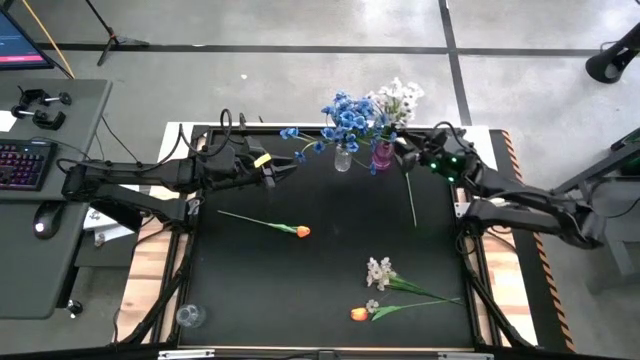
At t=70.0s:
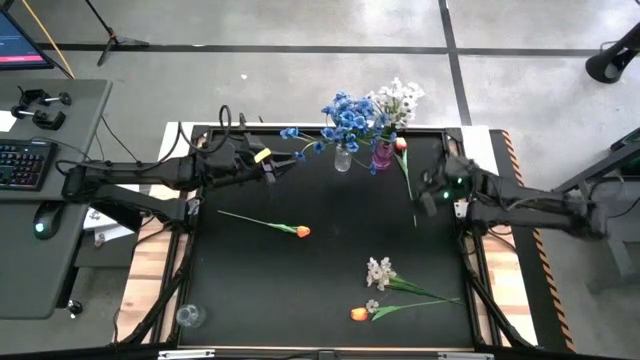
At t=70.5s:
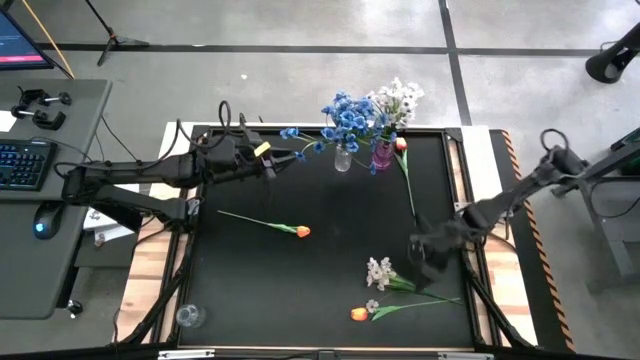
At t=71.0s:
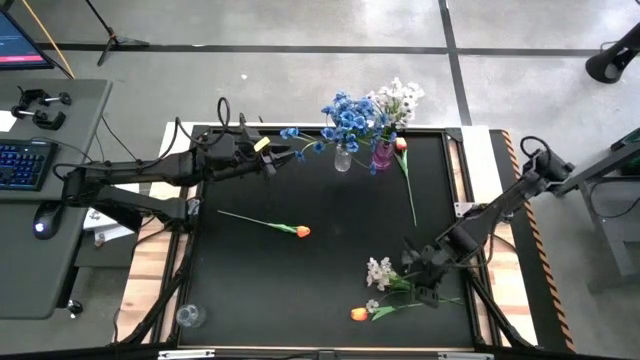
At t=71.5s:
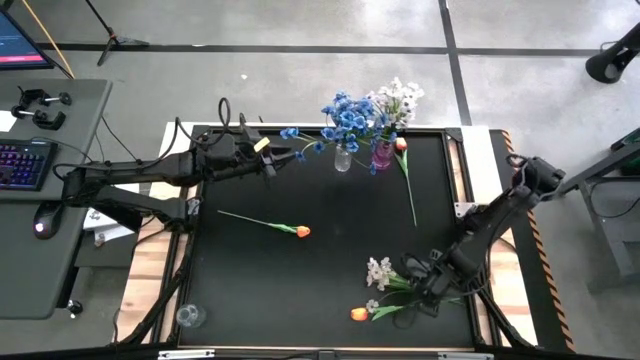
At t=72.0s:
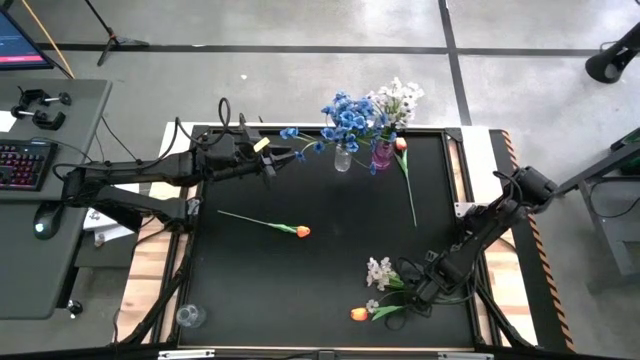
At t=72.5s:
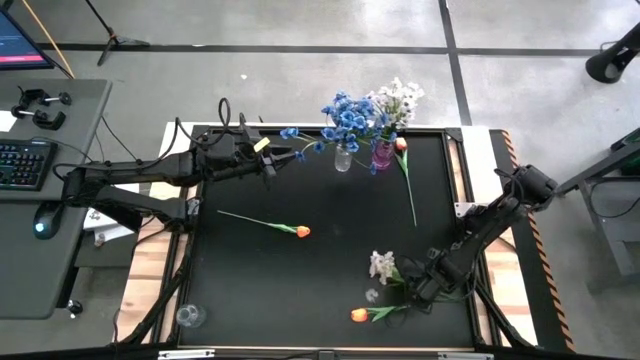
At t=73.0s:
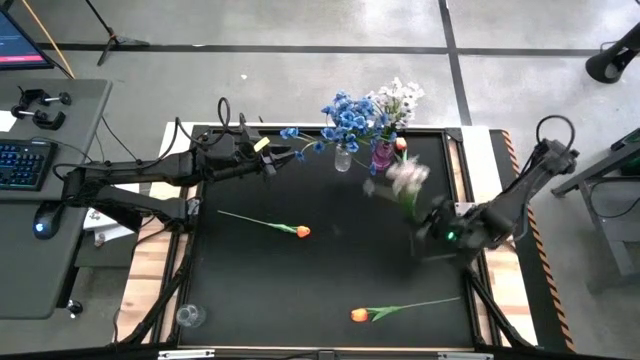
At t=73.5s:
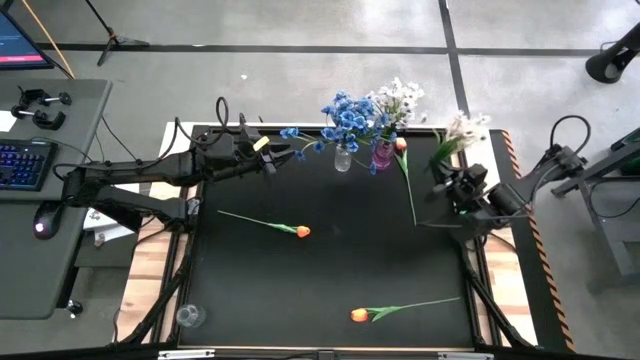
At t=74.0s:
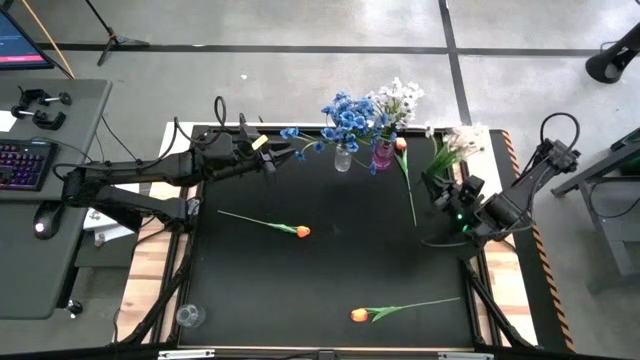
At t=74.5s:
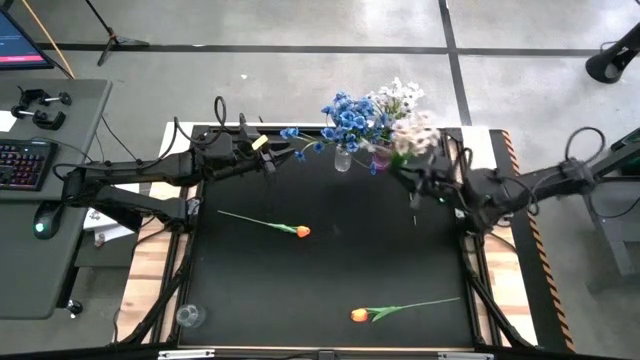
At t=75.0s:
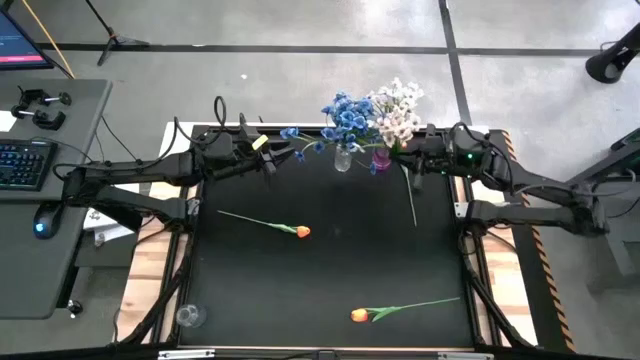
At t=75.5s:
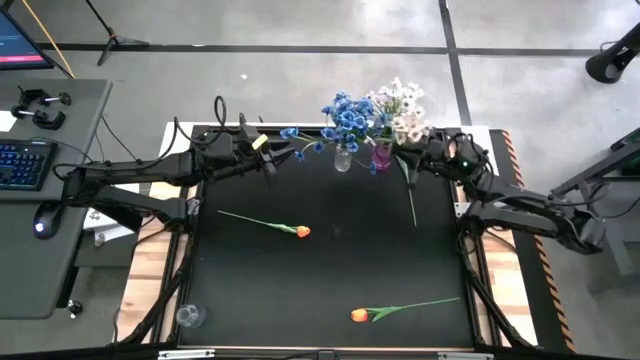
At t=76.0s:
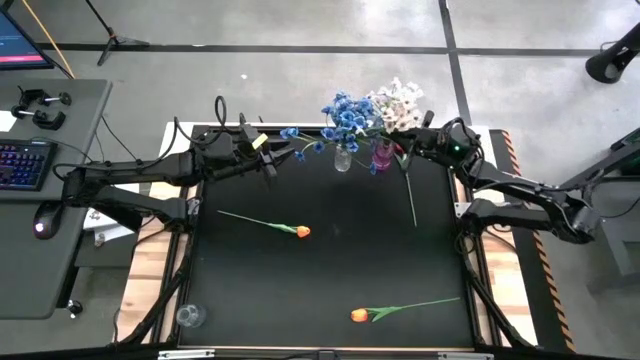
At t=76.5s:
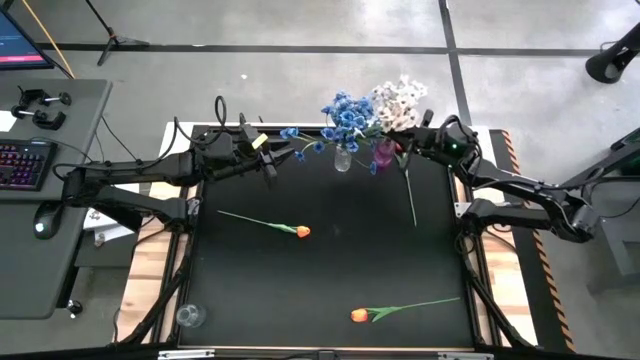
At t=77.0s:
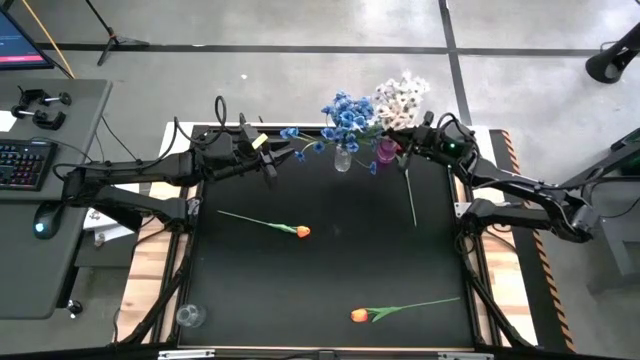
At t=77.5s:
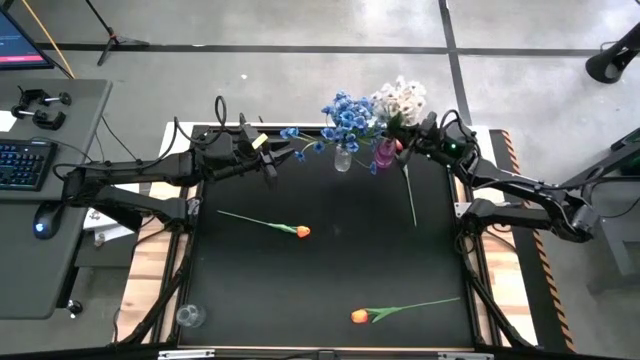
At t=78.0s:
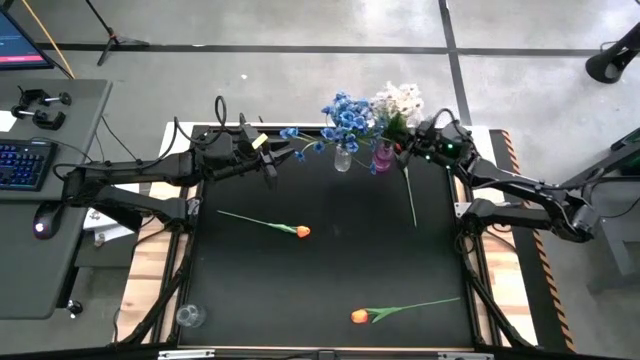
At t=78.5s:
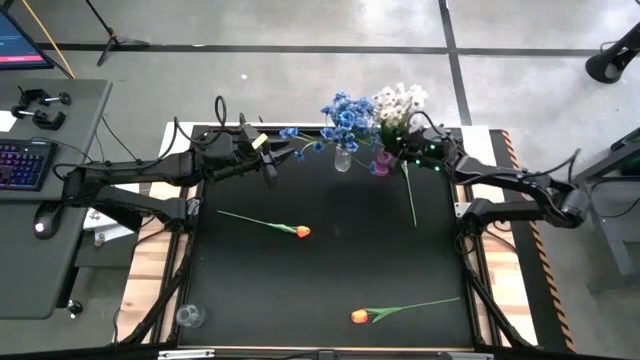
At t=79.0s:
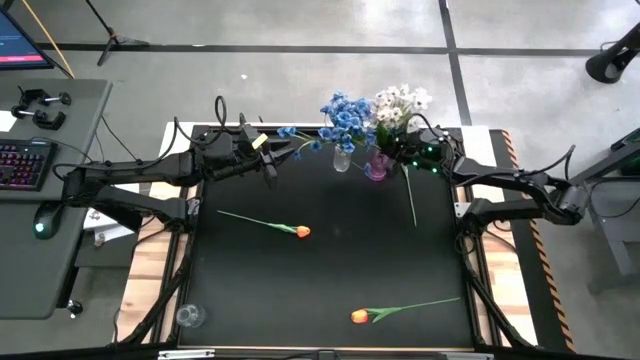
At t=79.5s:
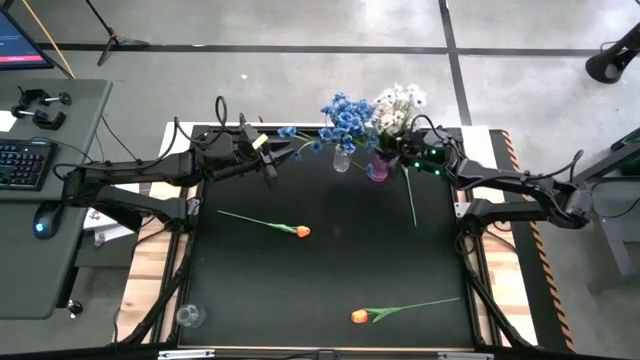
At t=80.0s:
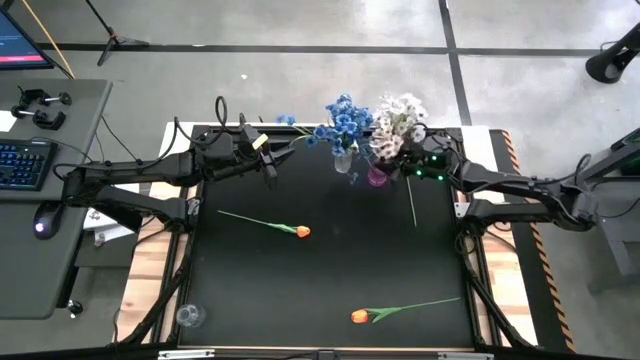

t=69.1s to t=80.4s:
Task: Sort flowers into vase by color
Put the white flowers into the purple vase

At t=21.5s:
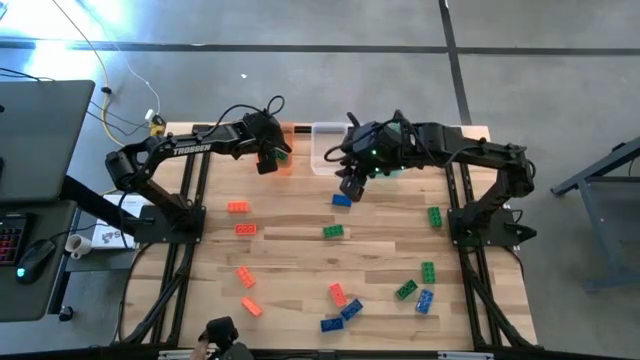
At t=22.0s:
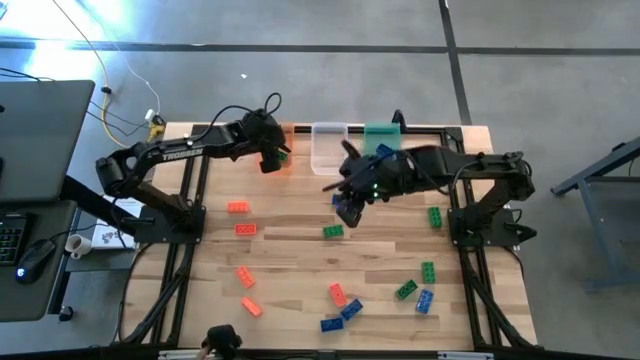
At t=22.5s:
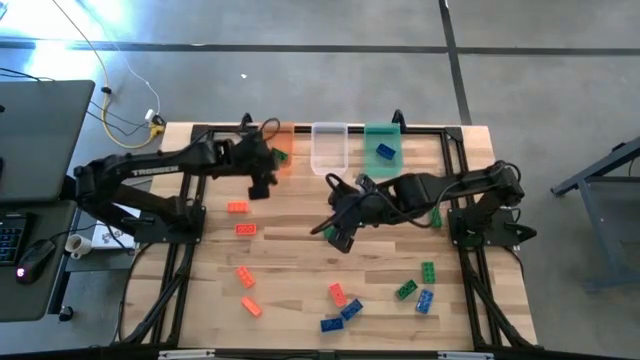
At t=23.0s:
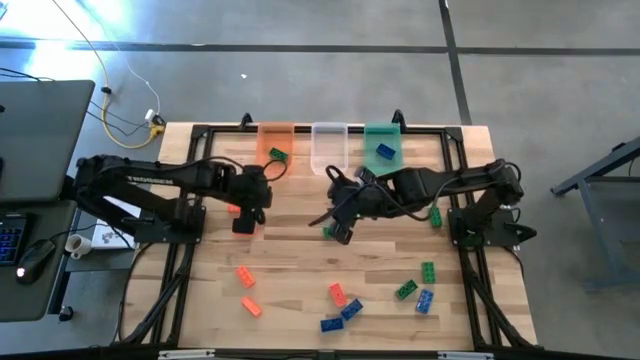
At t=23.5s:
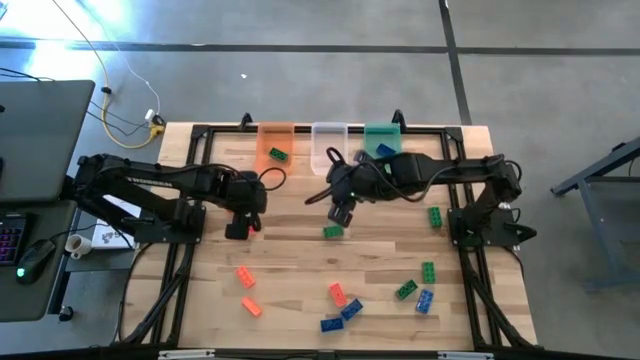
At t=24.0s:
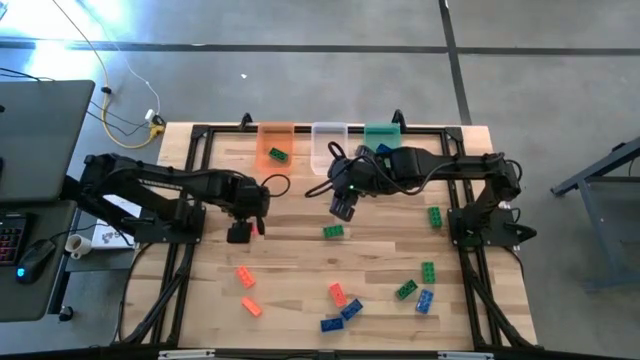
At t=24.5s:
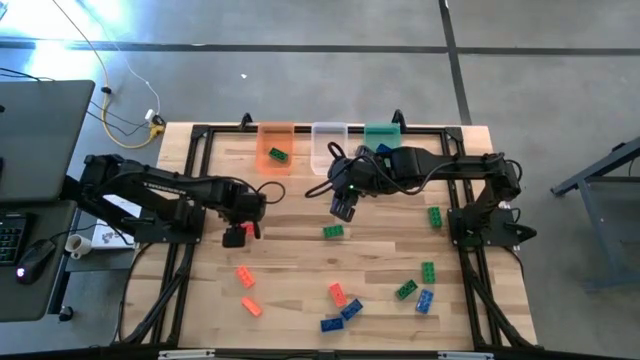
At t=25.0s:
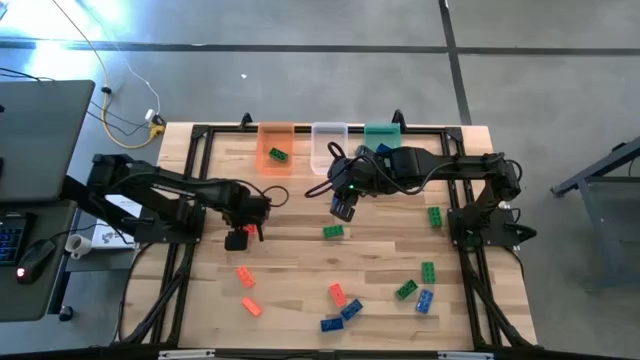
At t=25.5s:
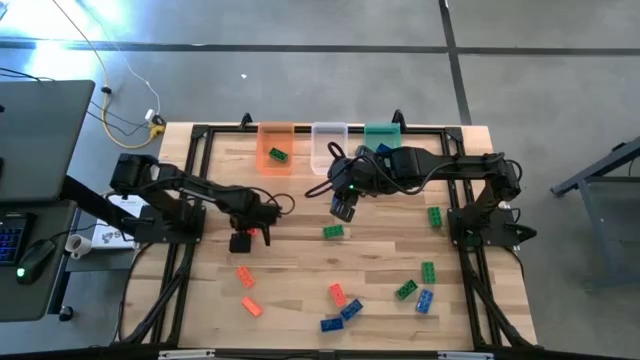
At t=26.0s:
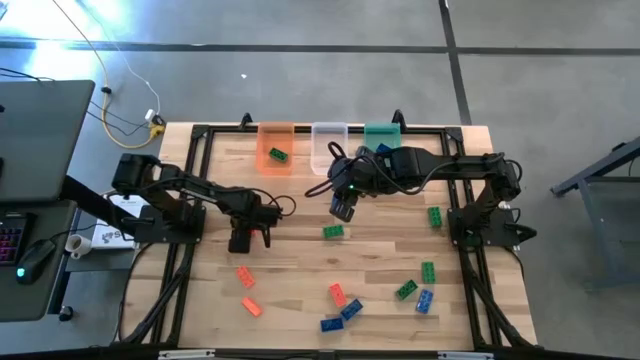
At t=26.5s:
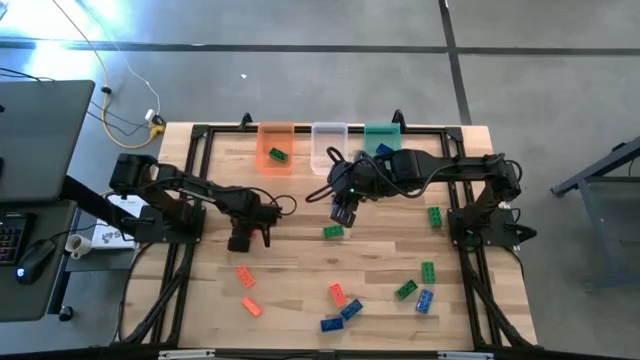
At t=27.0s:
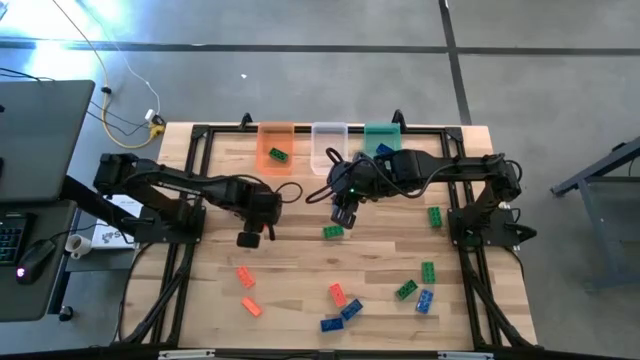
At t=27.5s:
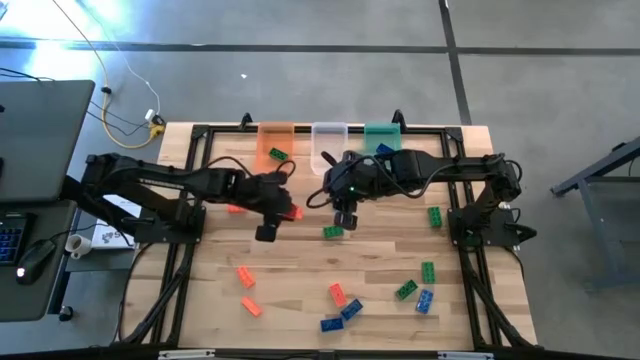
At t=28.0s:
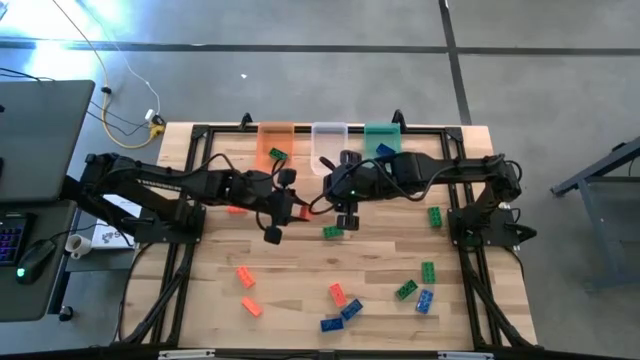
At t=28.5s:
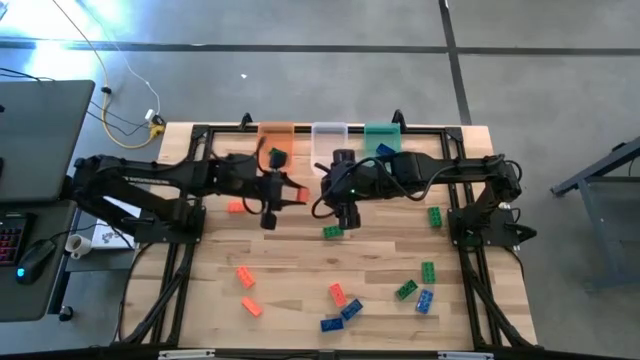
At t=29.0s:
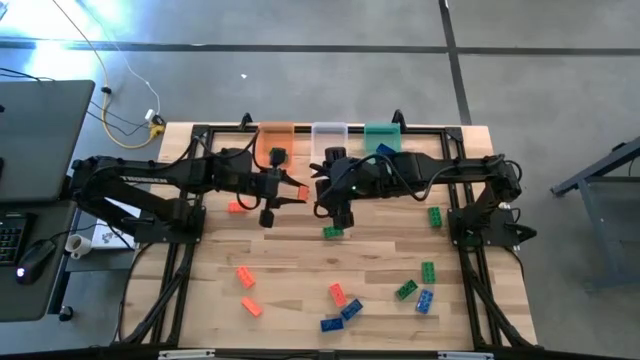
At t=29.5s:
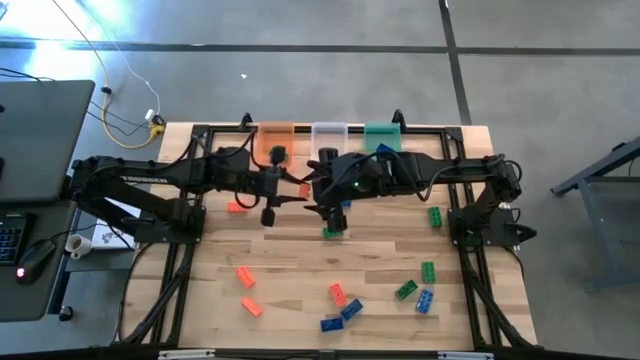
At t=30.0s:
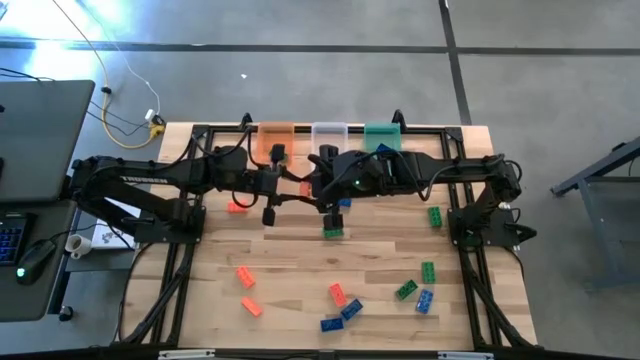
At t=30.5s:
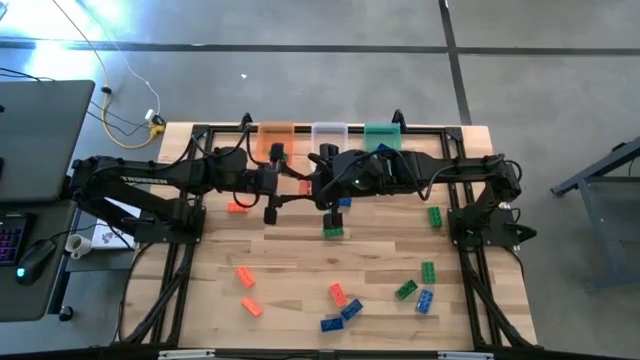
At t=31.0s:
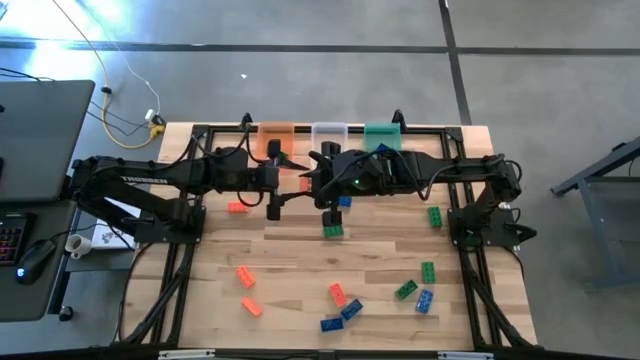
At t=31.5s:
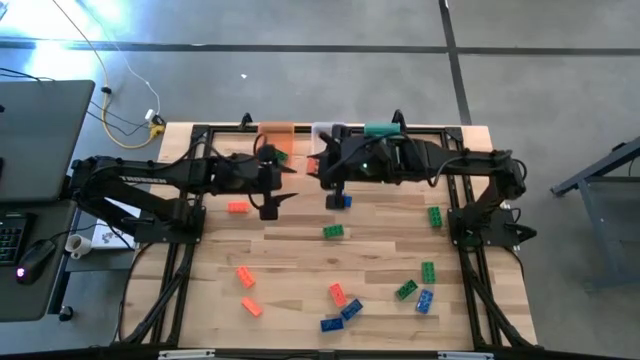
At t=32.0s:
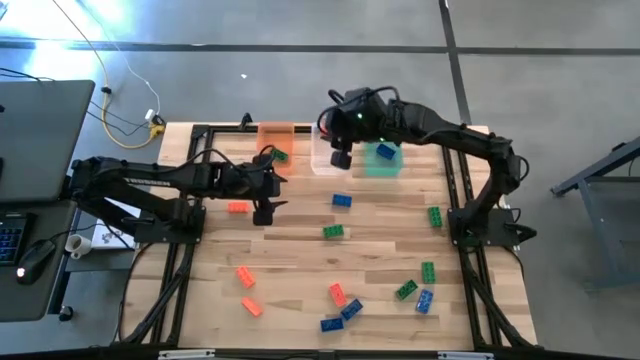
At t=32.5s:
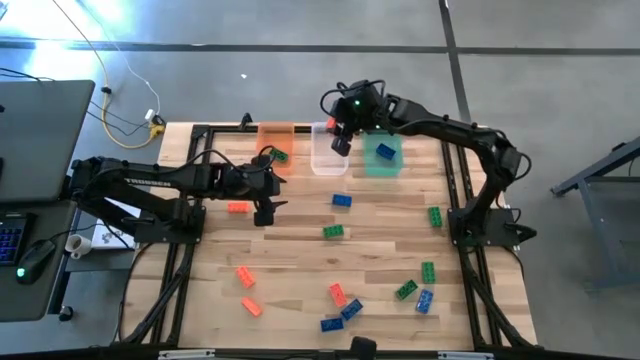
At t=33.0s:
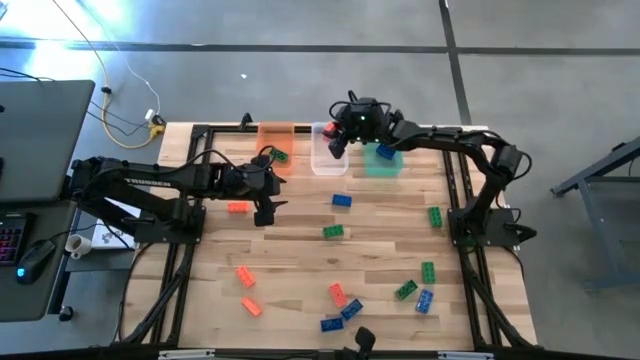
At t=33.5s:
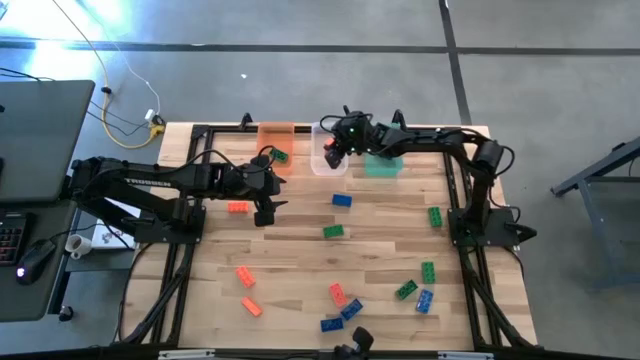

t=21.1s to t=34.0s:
Task: Sort & place blocks by color
Put the orange game piece into the transparent bin
